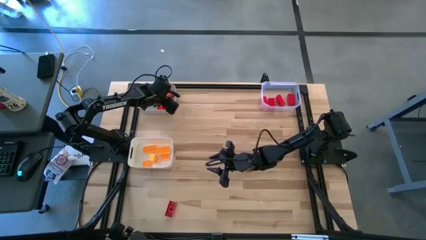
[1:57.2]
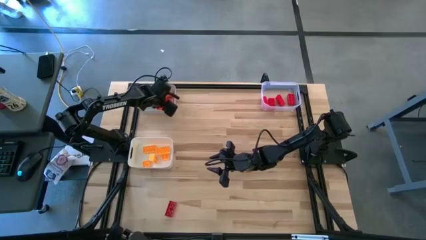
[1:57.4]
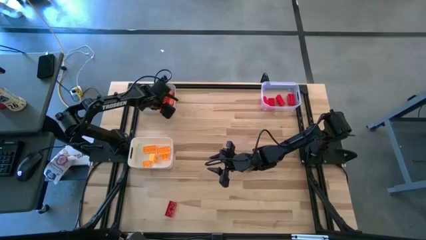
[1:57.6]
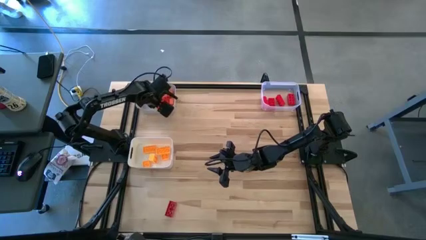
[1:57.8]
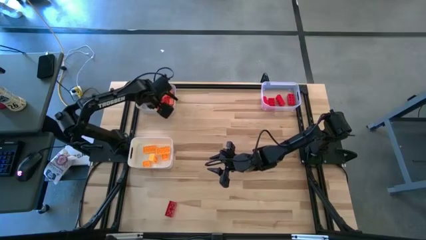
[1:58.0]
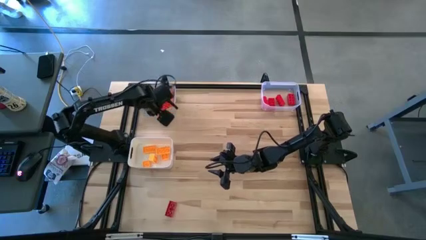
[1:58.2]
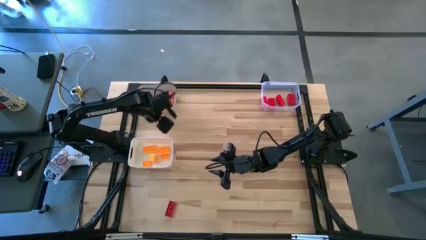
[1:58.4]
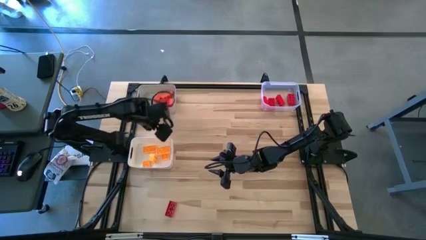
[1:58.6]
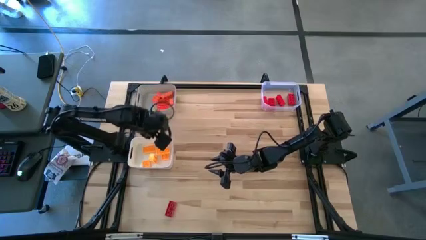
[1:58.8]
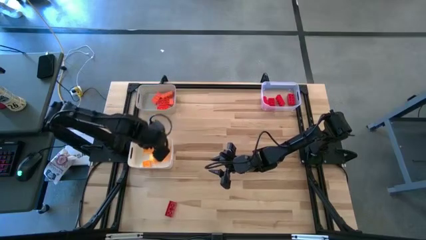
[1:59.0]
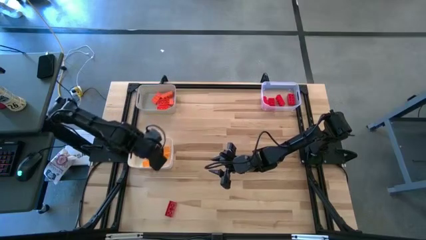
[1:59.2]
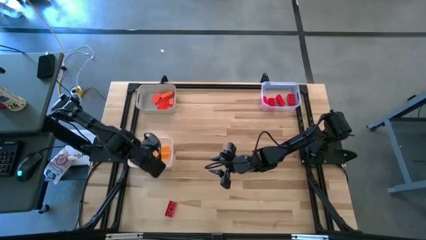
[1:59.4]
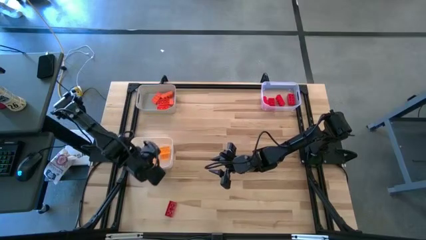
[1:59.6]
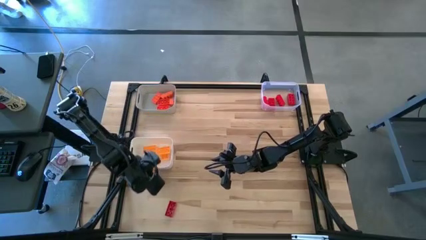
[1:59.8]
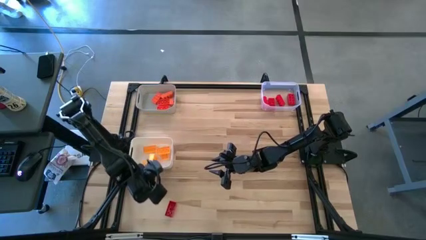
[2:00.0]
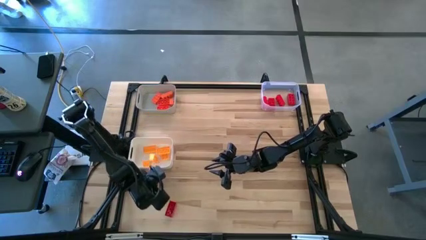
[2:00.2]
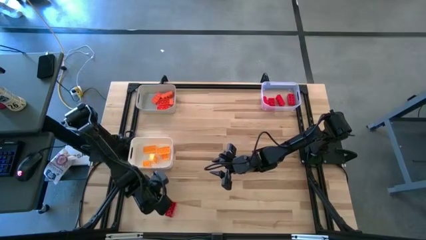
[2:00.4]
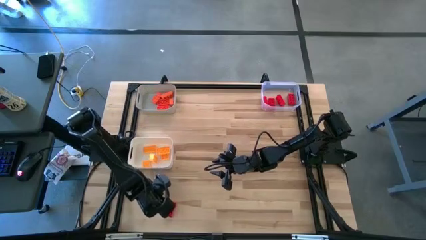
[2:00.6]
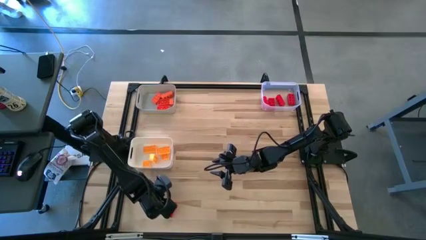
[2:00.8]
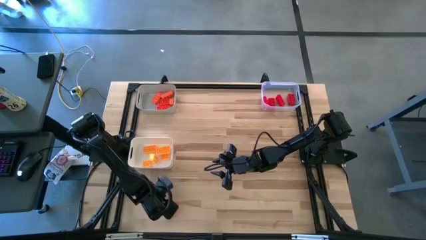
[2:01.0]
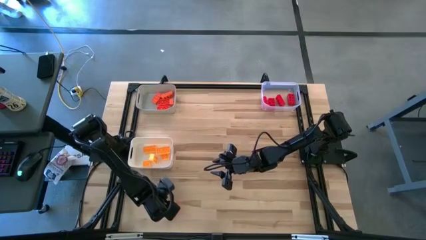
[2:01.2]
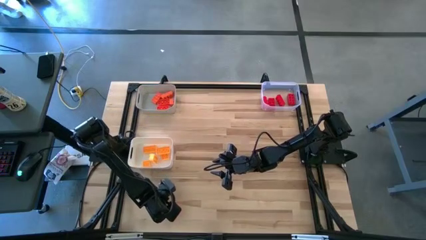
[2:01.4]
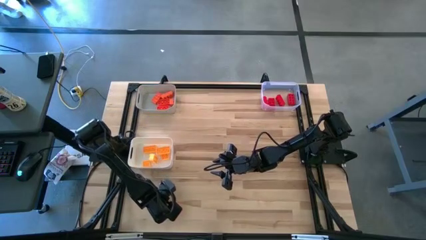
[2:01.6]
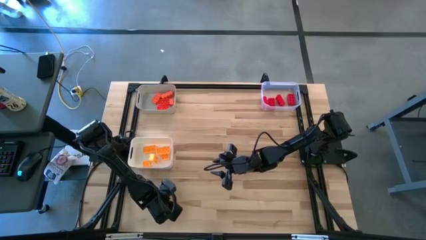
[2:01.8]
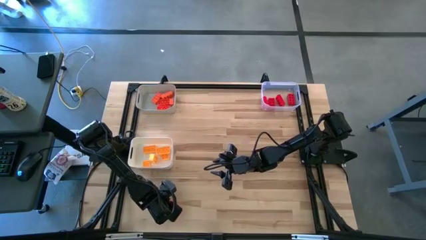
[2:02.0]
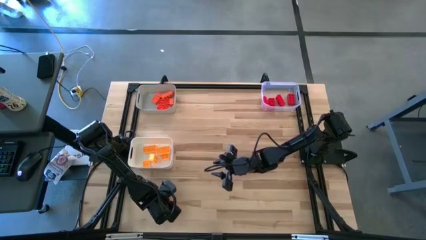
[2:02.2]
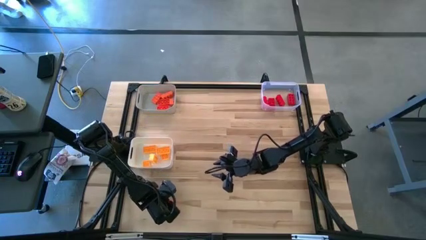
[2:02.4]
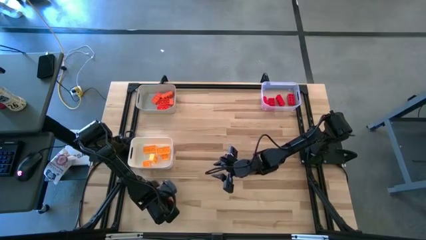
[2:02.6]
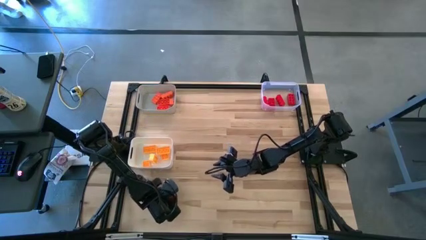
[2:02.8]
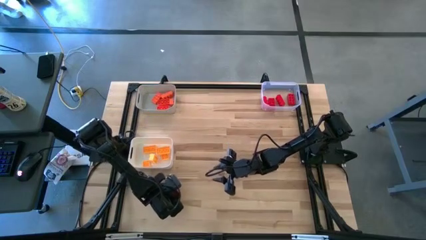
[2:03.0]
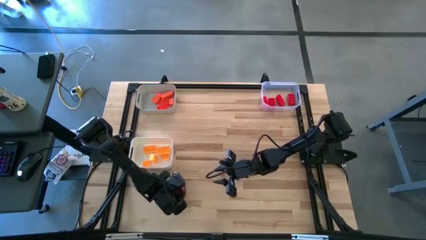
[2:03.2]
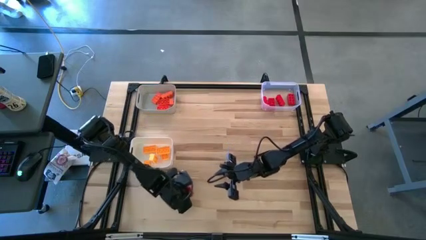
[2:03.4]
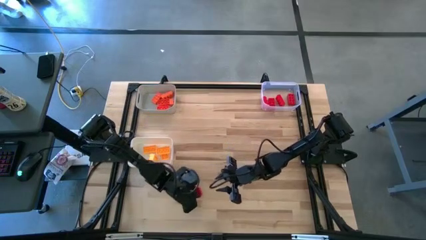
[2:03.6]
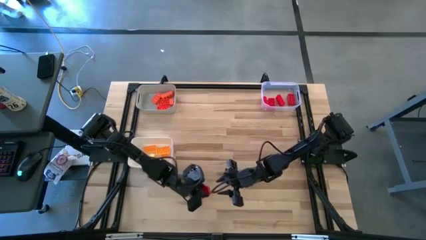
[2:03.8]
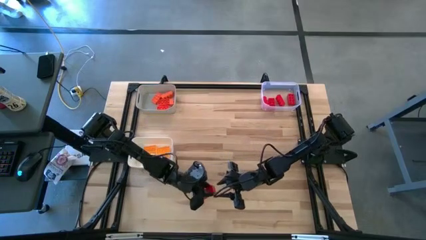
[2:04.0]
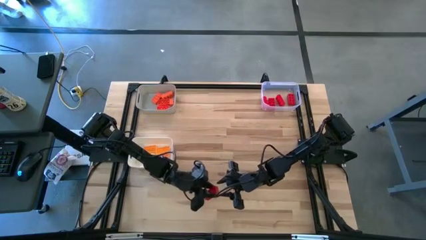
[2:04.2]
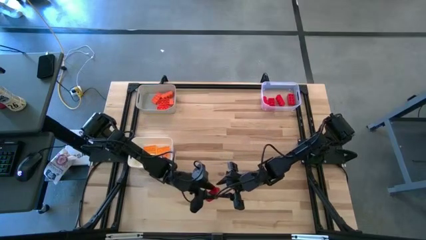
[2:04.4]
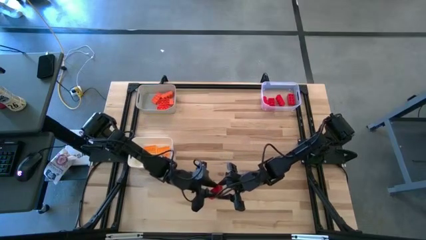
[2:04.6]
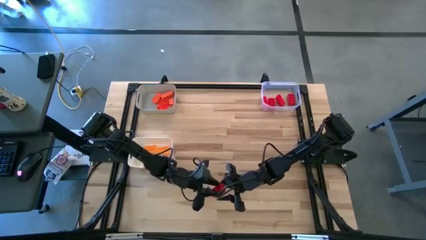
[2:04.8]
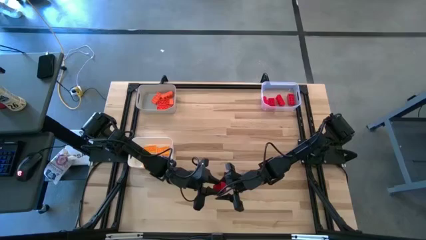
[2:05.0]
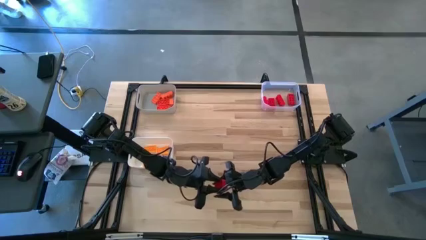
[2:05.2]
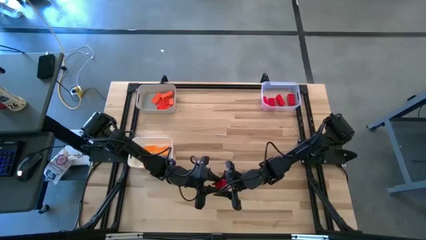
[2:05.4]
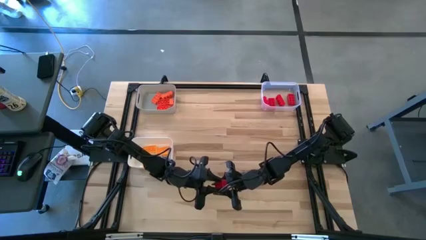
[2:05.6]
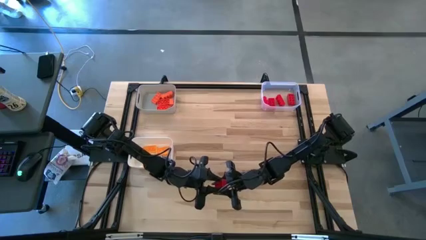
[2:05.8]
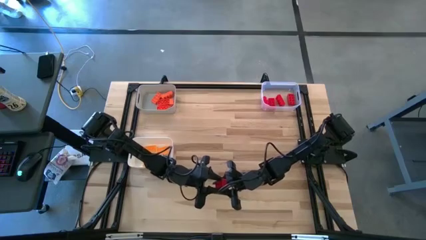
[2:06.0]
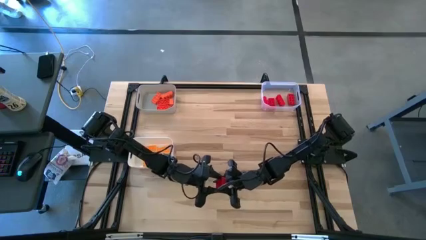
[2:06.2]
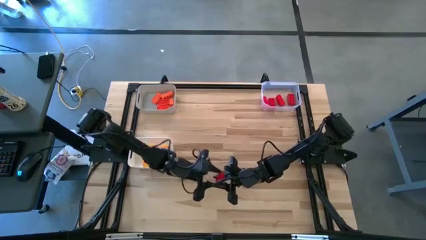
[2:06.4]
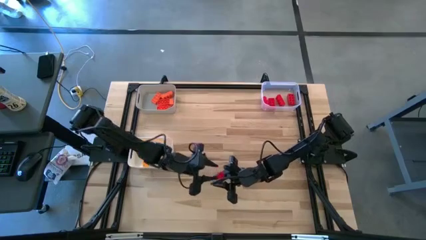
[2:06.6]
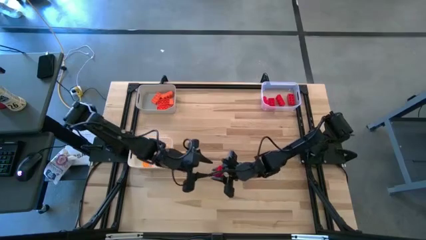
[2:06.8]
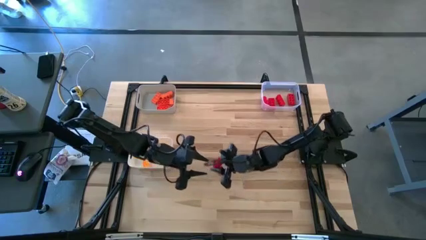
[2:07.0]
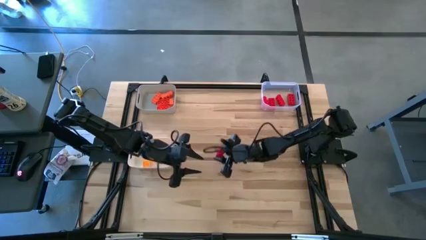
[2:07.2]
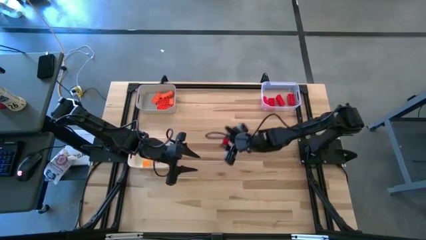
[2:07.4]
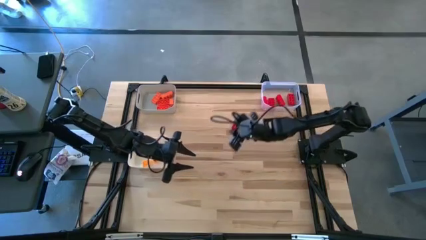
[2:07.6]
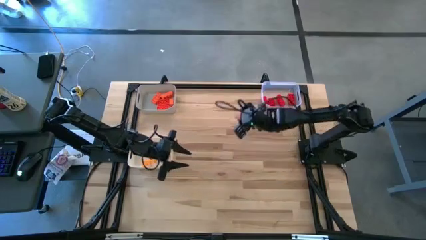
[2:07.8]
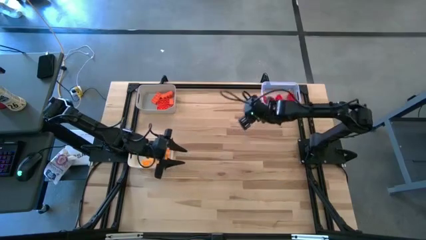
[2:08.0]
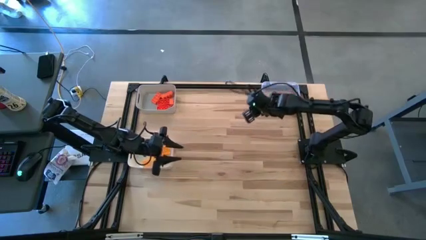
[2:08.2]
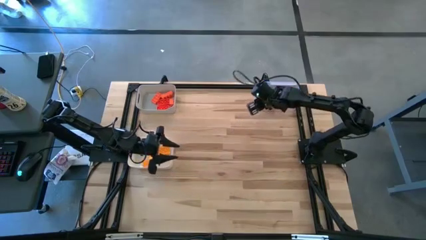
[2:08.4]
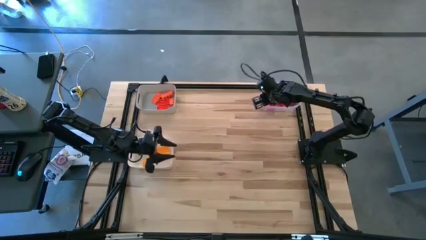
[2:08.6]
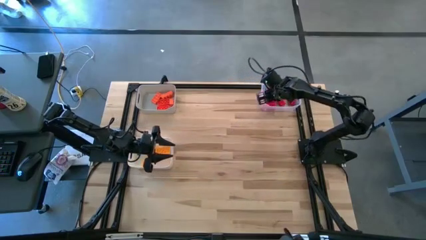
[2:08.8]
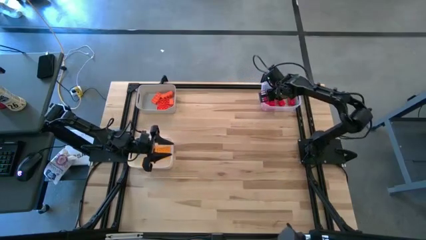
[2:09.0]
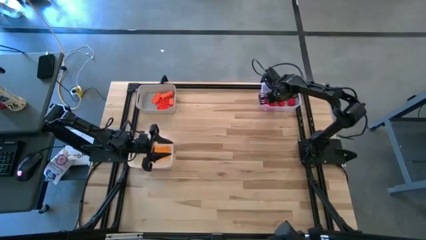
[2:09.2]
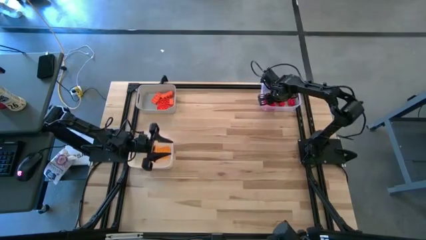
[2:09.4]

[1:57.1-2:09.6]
Task: Sort & place blocks by color
Put the red game piece into the transparent bin

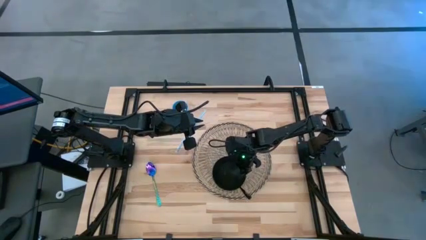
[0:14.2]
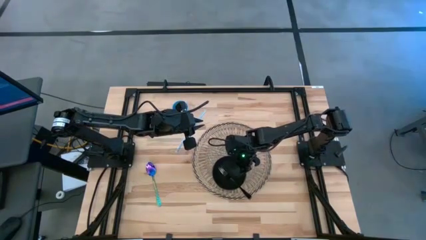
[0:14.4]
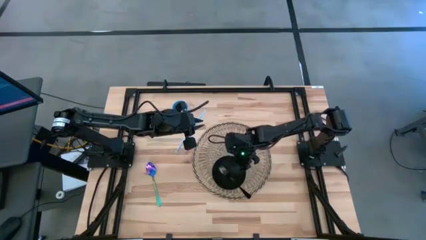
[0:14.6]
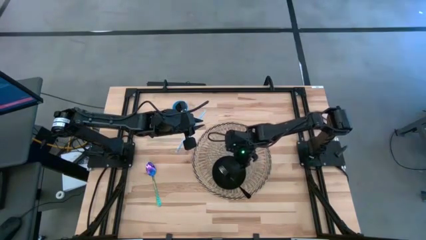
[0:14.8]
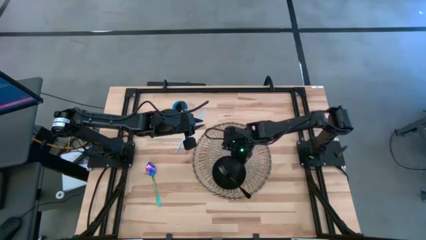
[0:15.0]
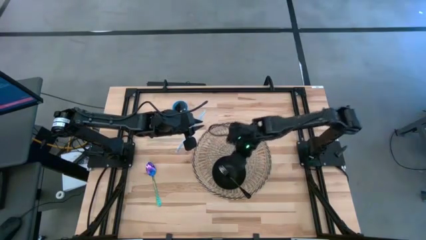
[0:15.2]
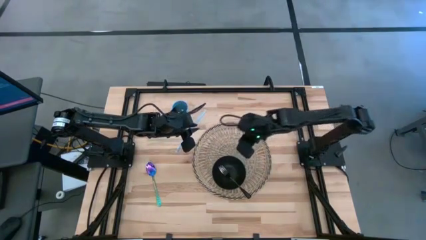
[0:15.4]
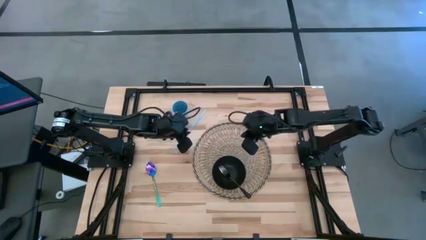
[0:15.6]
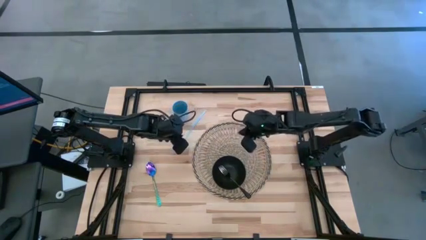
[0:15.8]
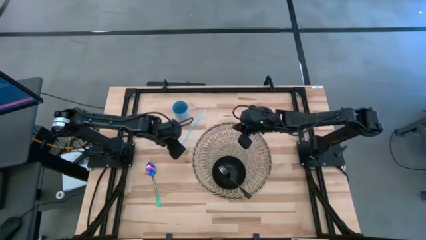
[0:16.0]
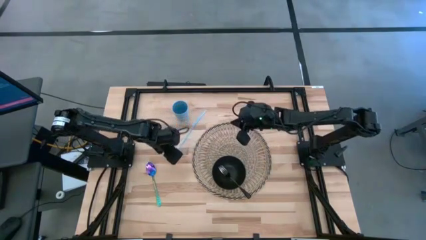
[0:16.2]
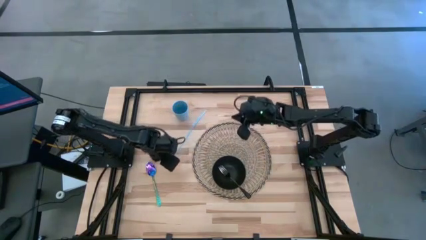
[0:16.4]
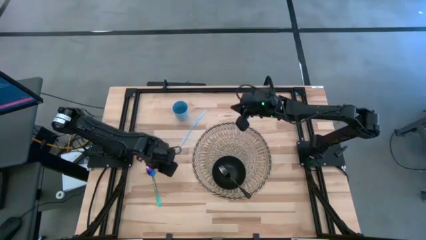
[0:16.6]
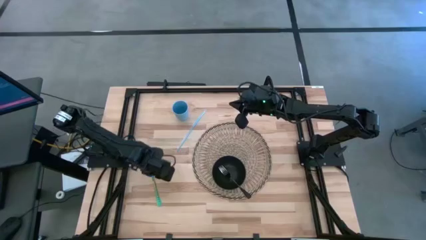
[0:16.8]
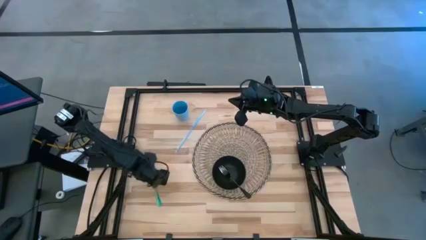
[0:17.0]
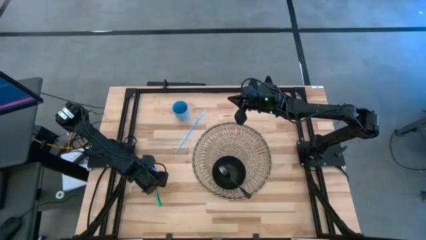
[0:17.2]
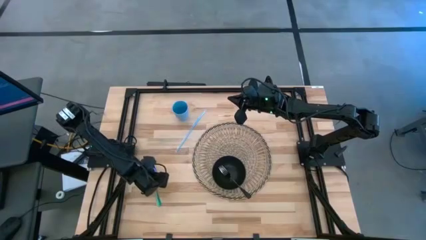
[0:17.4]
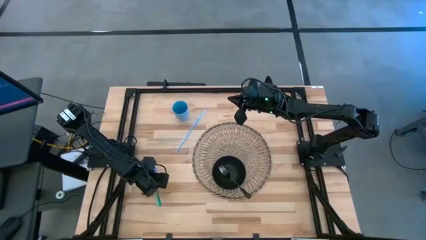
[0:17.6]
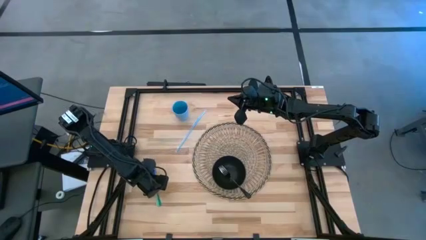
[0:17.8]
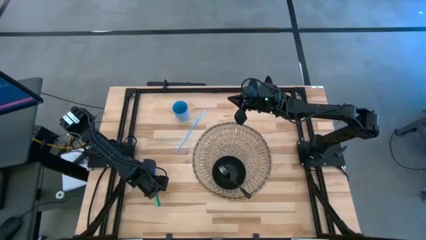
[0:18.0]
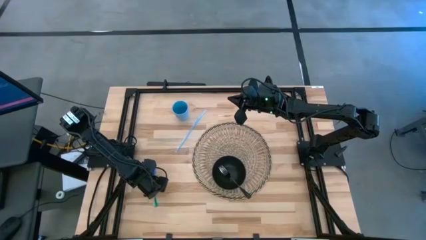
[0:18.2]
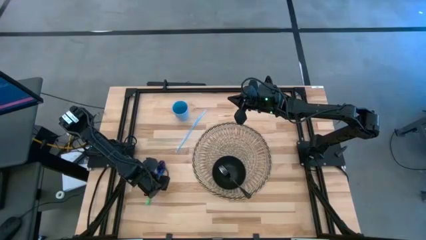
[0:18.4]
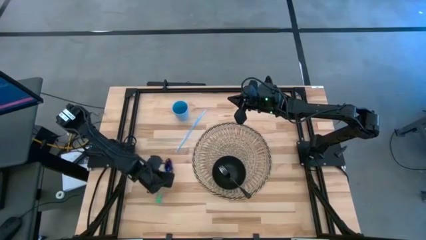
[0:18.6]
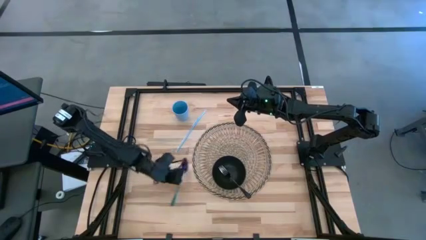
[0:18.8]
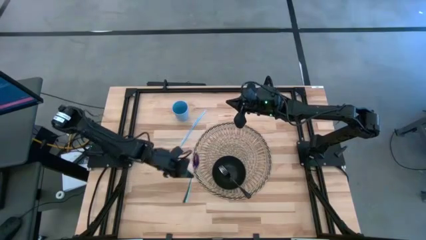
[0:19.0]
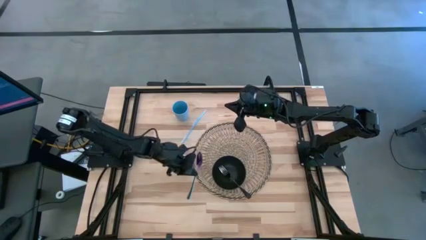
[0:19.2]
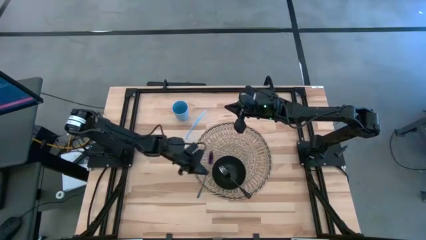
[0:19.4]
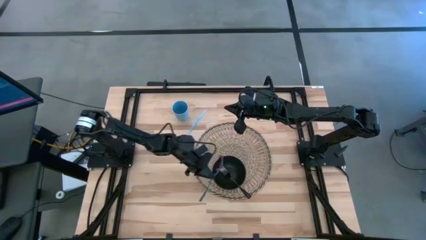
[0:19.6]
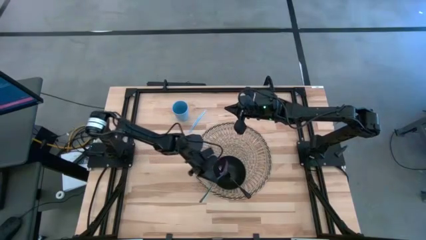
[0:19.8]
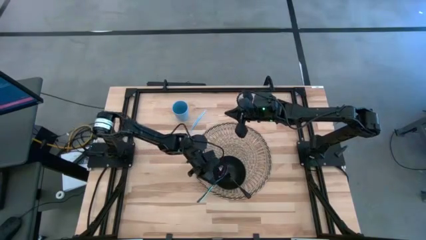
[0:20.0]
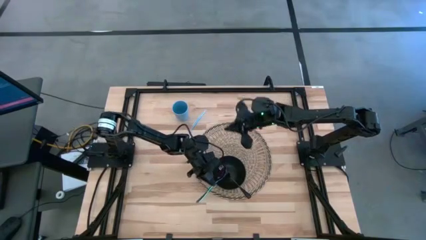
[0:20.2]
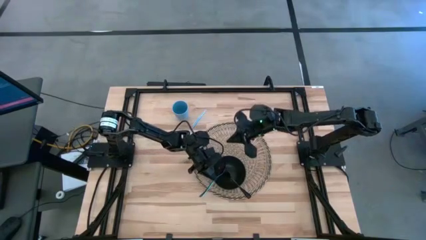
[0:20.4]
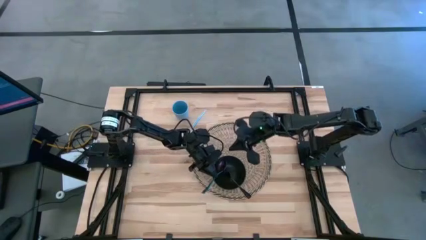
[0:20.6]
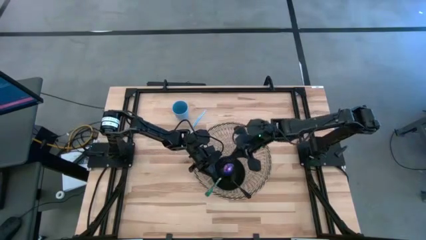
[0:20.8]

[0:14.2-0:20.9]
Task: Pick & Place Utensil
Put the purple spoon into the black bowl
